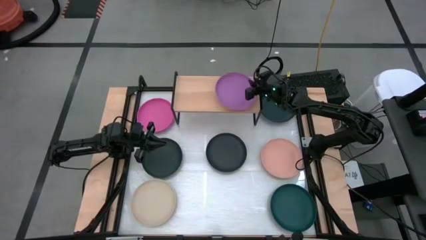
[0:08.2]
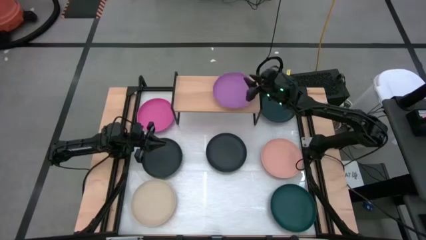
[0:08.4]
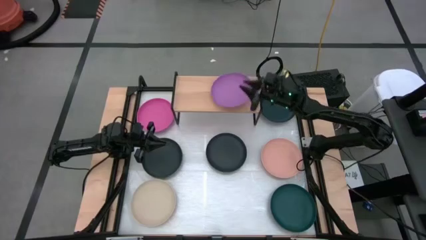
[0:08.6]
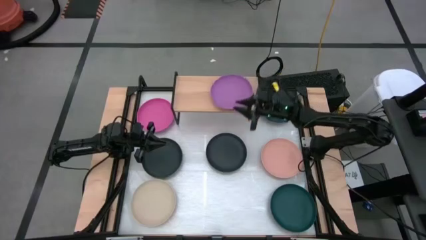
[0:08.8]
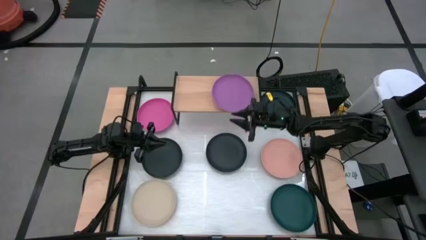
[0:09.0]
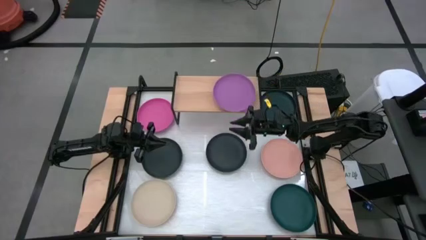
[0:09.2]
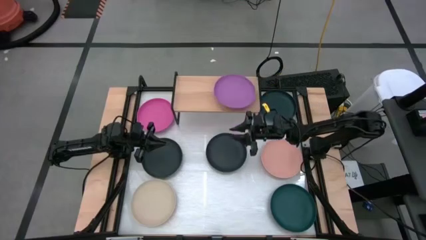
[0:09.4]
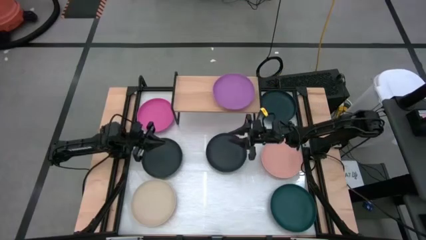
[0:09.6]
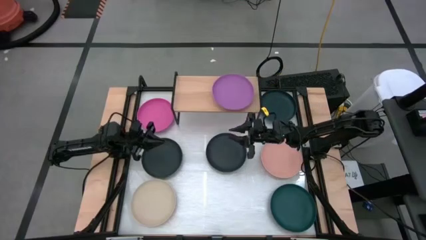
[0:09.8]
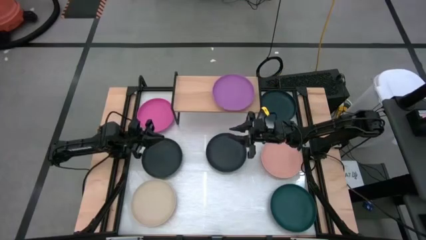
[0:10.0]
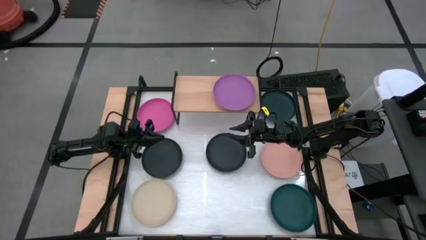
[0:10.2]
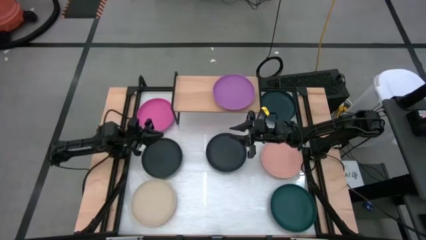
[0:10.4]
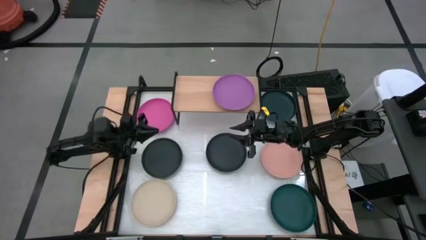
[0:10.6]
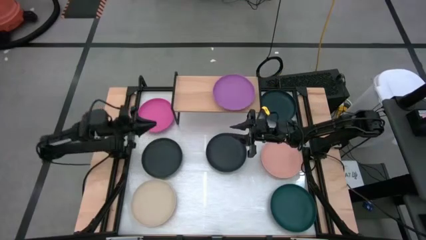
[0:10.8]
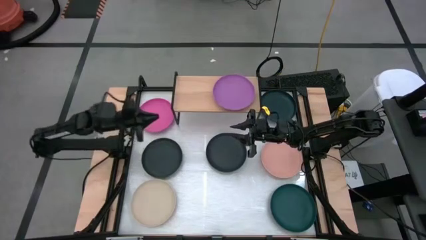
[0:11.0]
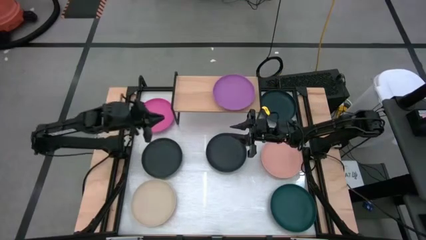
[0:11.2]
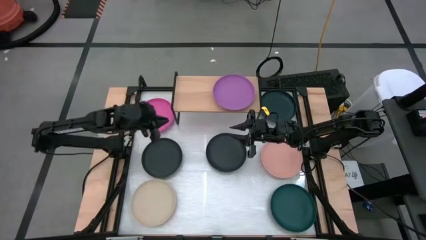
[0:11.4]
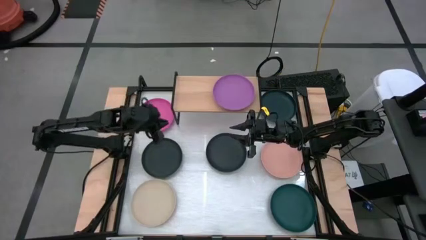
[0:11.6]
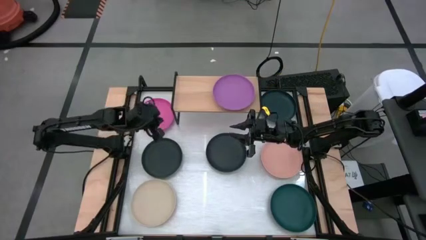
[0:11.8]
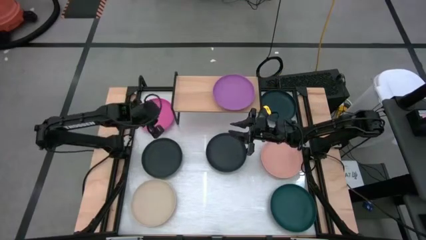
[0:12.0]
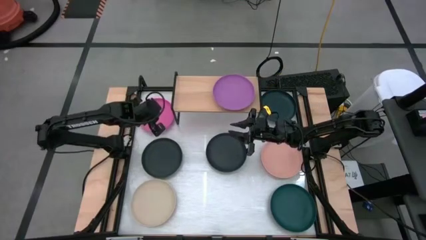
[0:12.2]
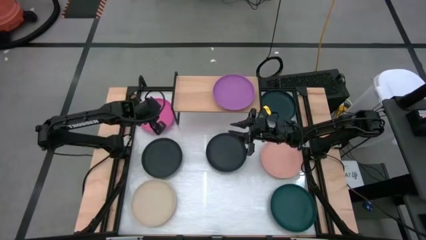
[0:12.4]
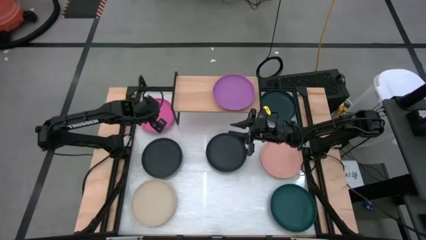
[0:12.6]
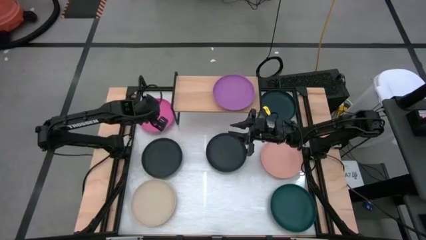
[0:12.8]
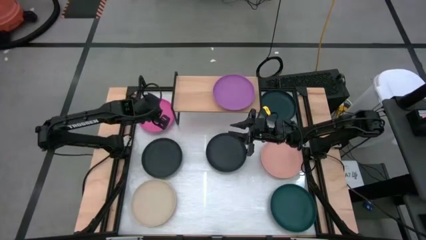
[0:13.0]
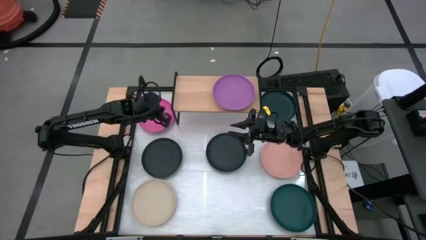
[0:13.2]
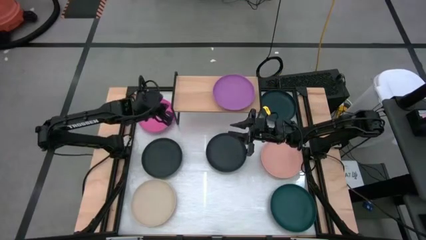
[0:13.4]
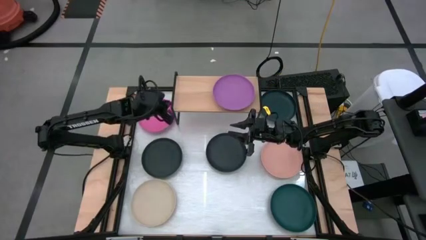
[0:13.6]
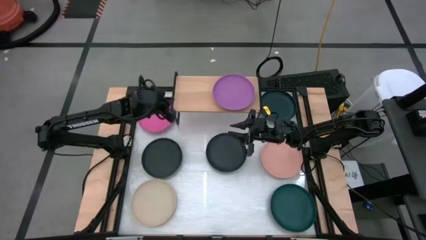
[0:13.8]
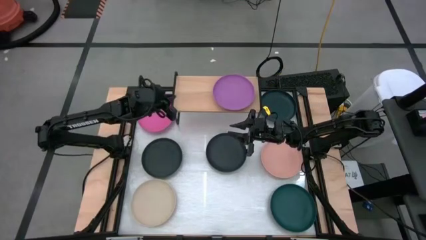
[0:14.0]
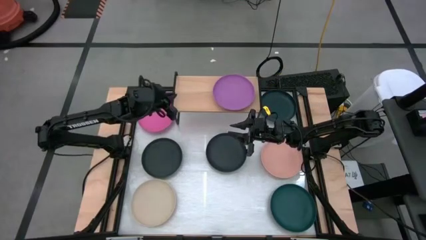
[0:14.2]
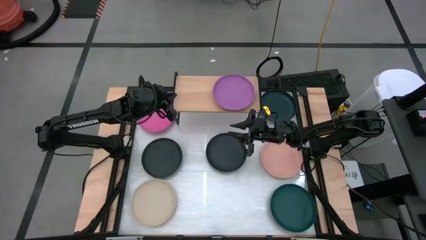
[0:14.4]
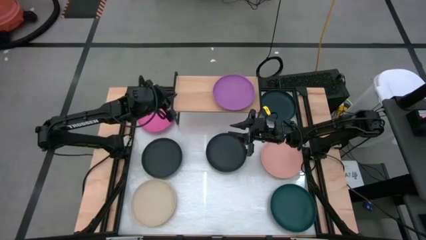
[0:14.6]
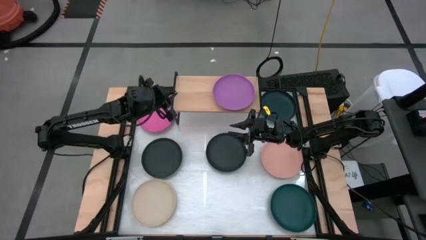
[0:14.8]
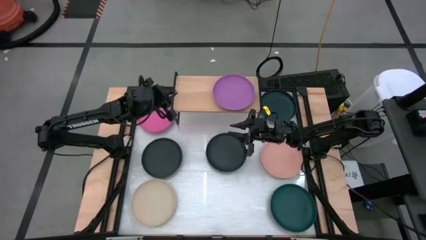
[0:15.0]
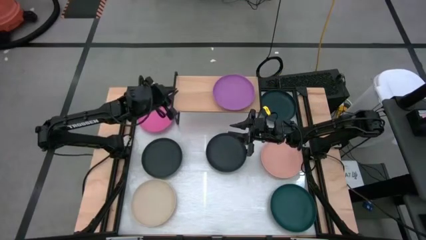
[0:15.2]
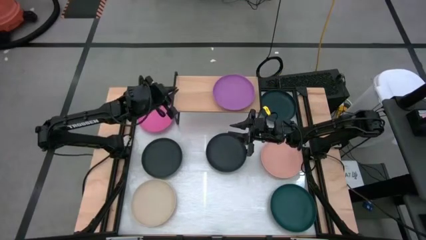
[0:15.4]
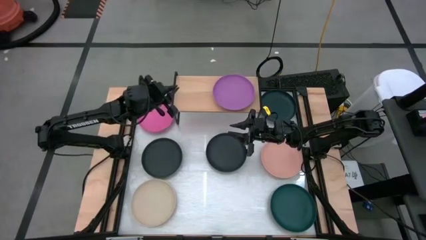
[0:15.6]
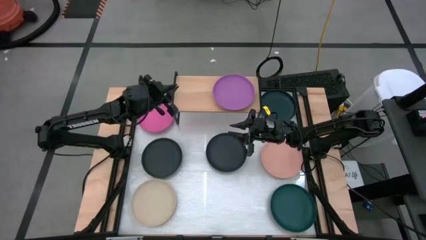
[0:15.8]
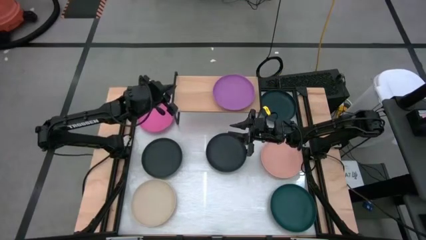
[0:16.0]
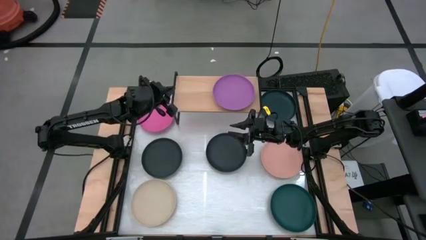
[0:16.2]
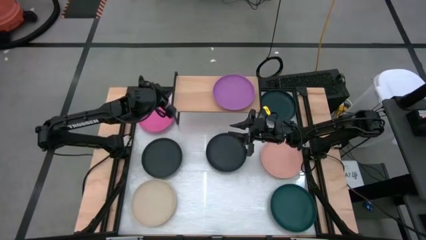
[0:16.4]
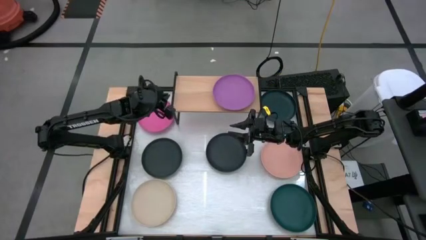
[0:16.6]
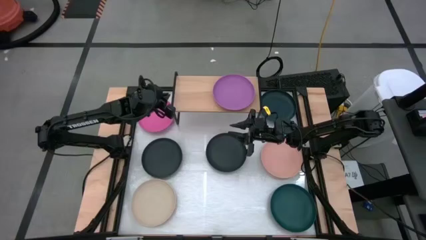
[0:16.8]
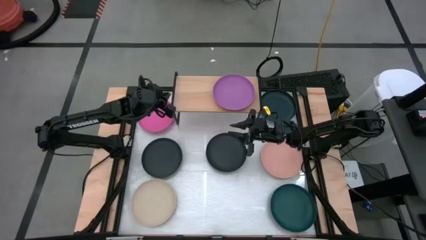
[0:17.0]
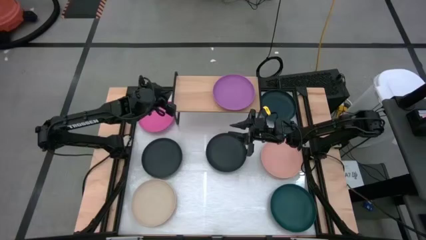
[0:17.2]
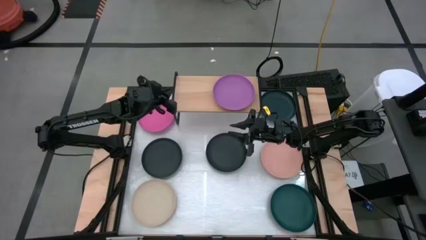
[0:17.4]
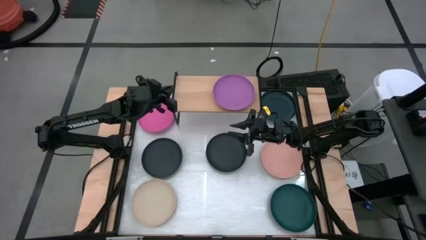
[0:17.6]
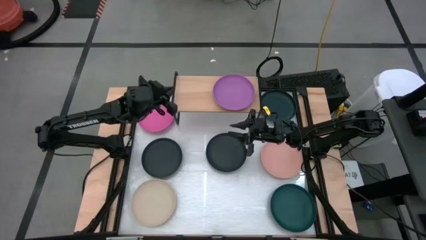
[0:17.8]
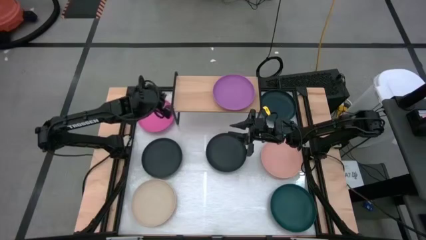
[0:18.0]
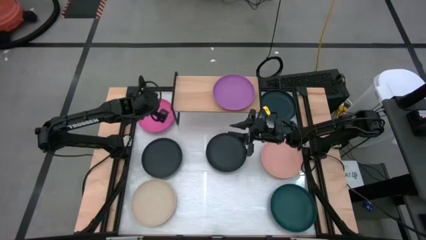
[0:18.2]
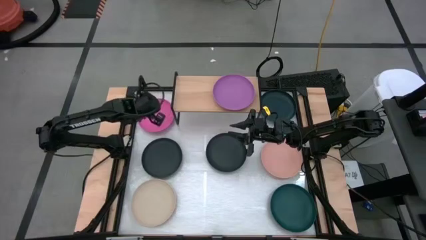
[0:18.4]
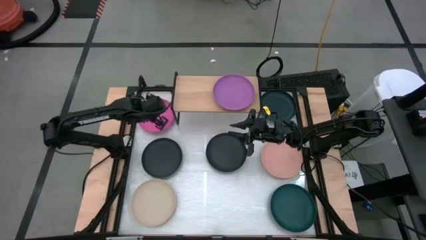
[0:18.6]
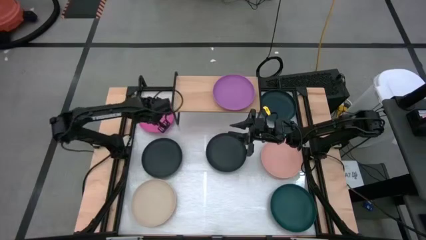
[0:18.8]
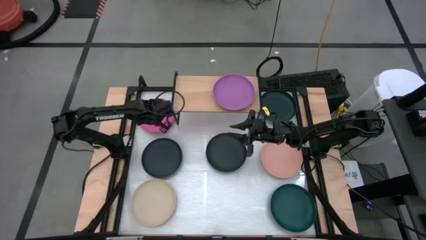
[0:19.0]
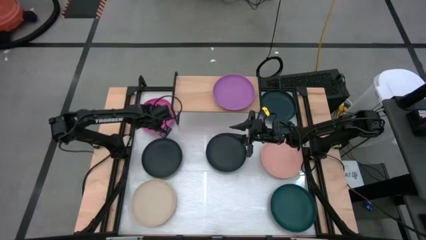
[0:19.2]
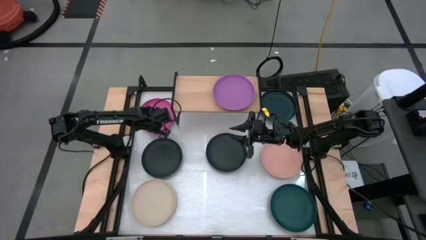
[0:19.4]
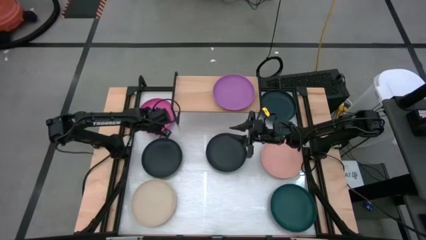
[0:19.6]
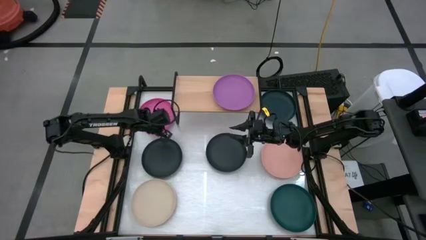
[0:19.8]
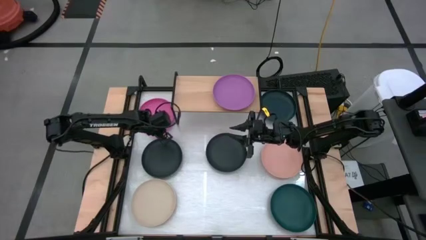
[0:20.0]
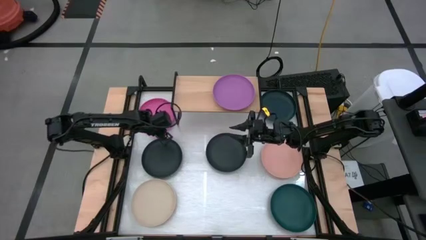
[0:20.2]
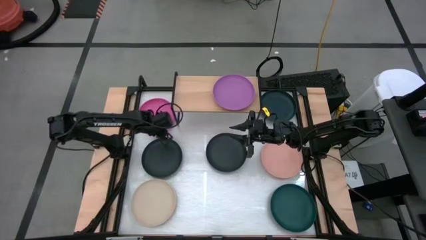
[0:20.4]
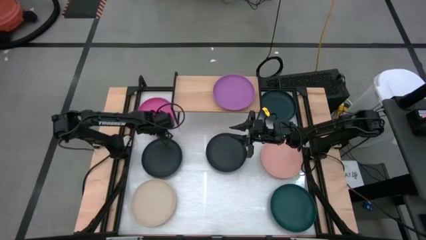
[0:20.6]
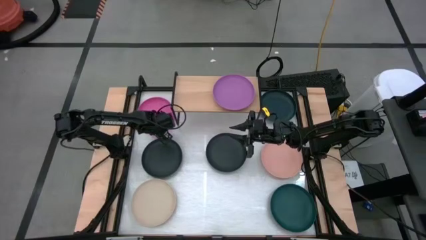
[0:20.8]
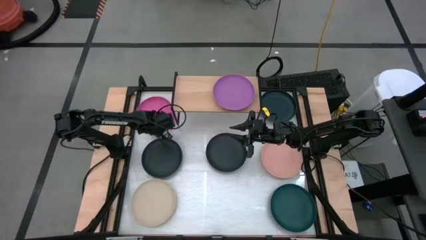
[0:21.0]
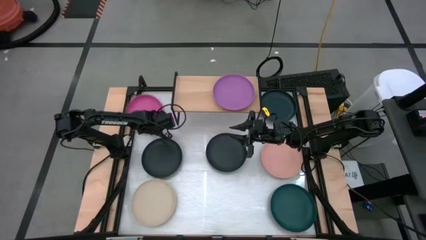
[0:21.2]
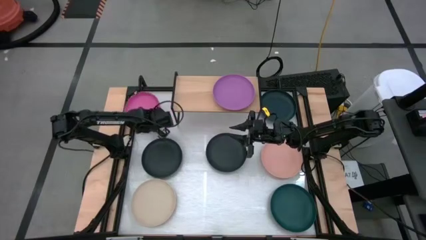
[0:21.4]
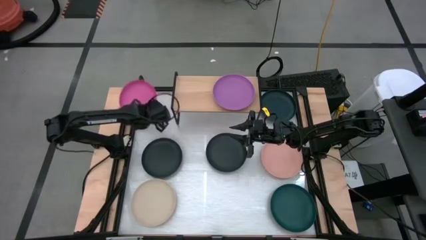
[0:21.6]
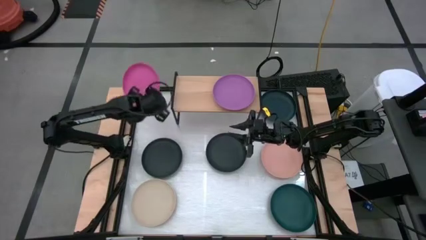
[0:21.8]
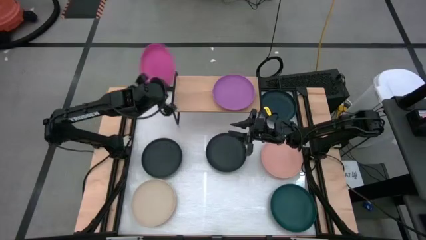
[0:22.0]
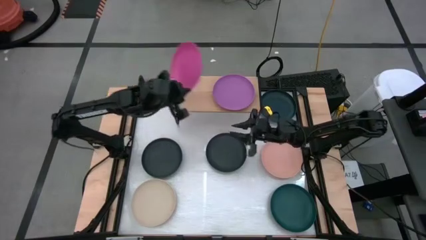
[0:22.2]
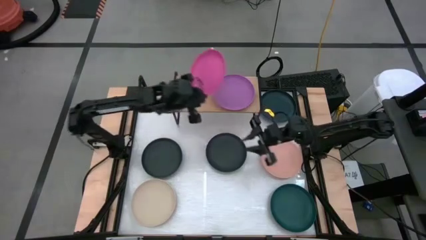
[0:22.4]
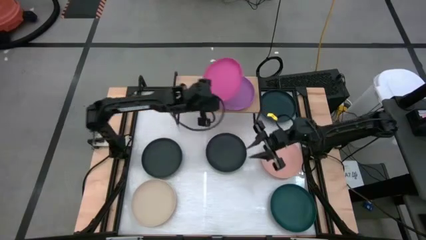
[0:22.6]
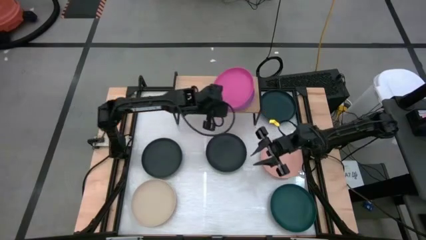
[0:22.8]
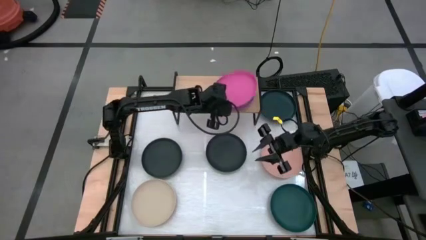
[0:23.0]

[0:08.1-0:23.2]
Task: Place and stack plates onto a shelf
Stack the pink plate on top of the purple plate on the shelf

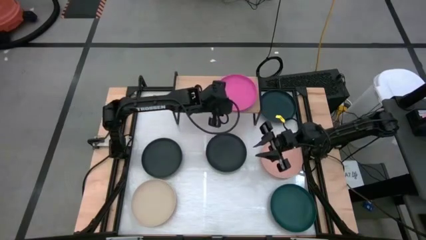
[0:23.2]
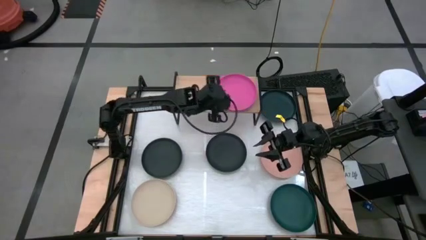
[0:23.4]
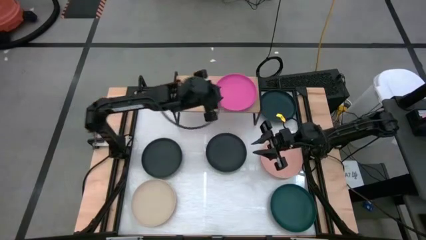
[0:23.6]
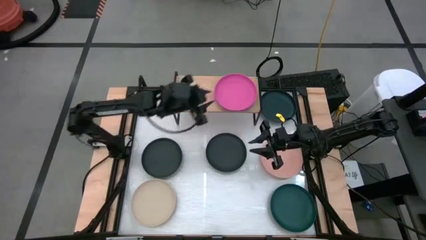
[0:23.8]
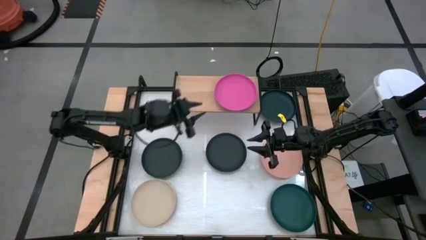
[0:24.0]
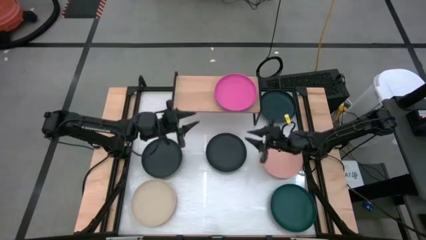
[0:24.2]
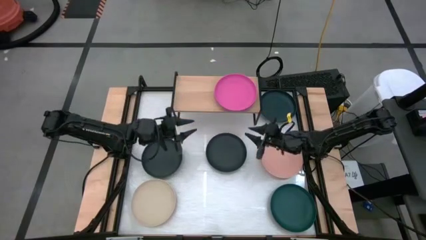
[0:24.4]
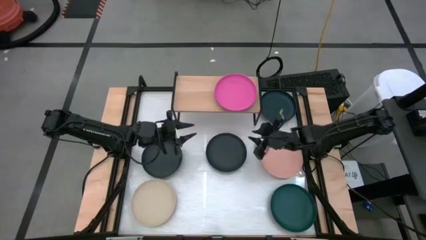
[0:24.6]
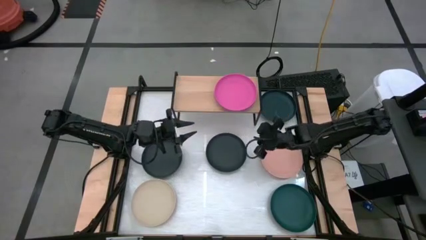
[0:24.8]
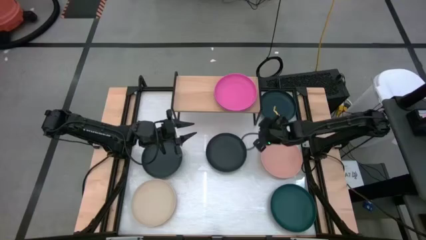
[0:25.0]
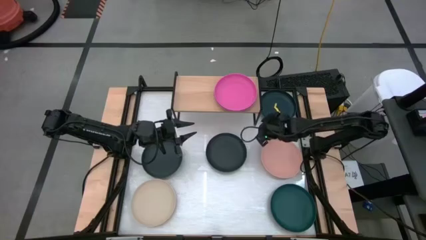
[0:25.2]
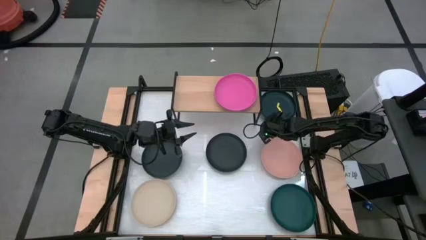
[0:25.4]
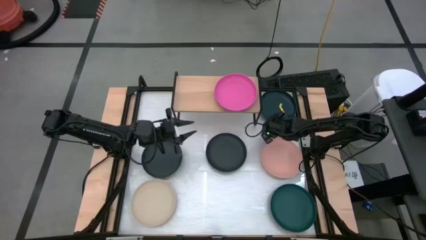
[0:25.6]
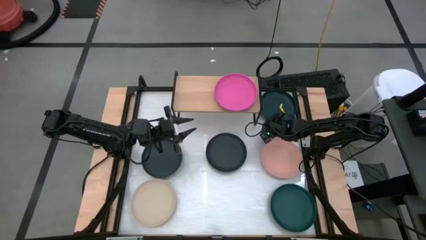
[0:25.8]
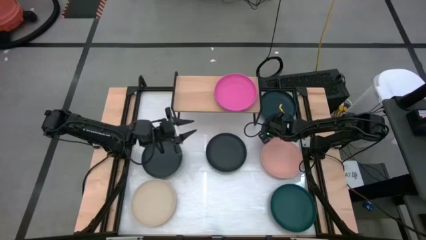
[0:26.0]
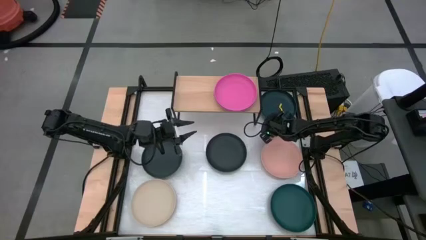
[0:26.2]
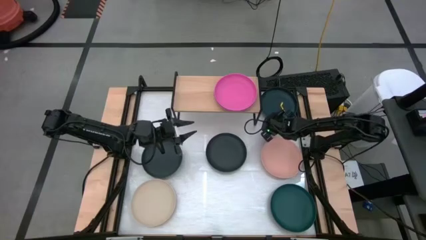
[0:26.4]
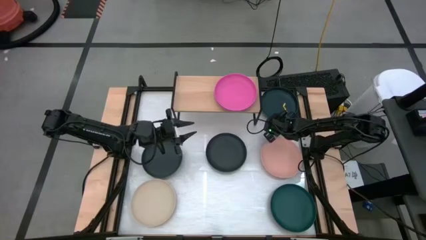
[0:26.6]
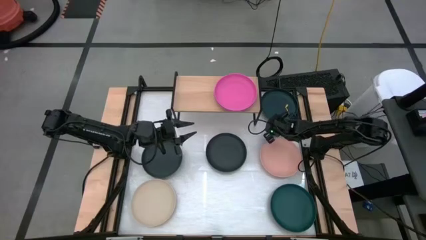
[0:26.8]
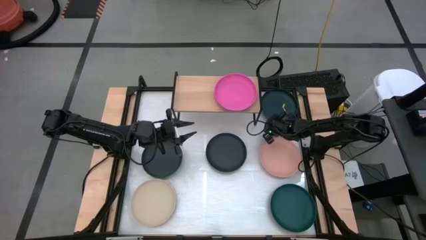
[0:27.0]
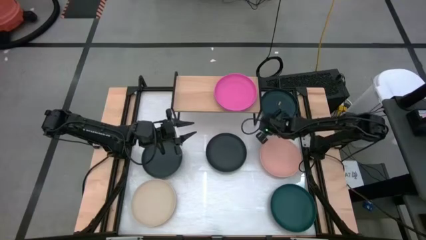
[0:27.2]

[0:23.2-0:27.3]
Stack the top dark green plate on top of the pink plate on the shelf
